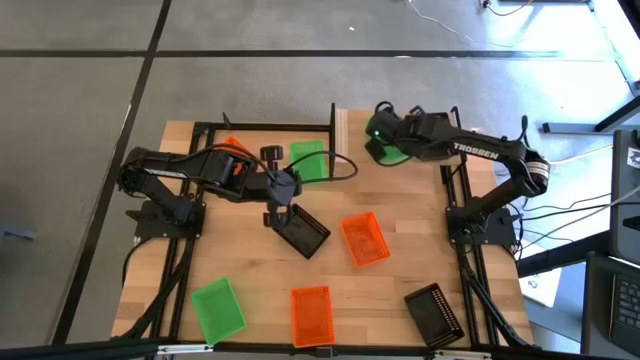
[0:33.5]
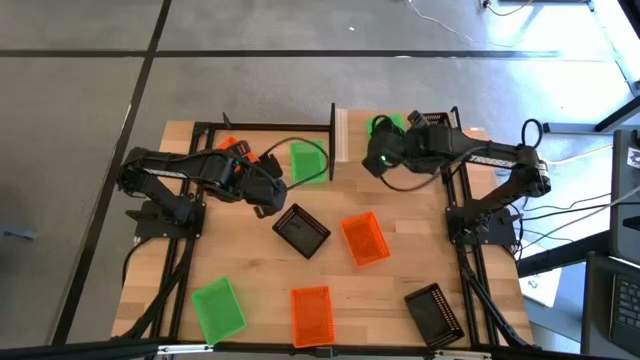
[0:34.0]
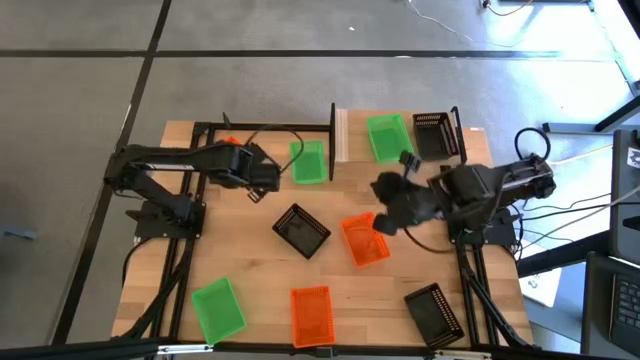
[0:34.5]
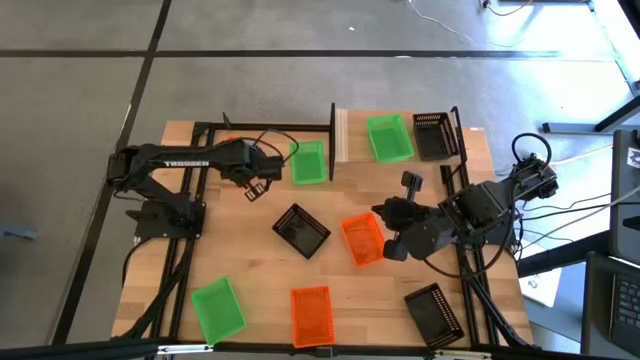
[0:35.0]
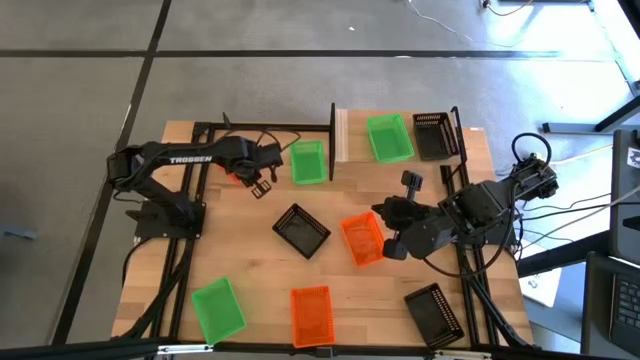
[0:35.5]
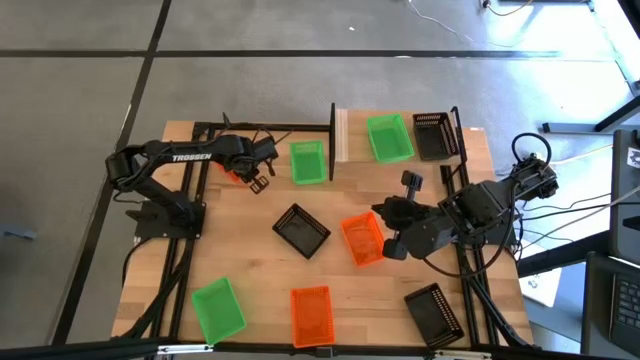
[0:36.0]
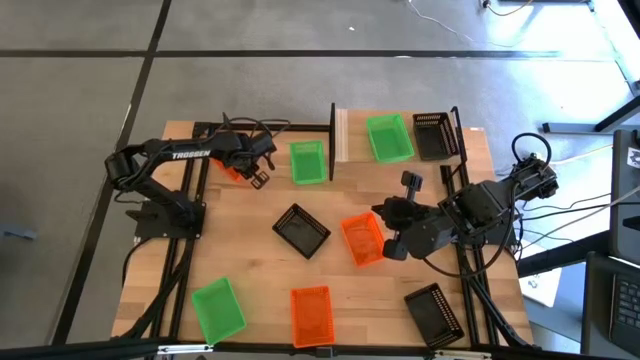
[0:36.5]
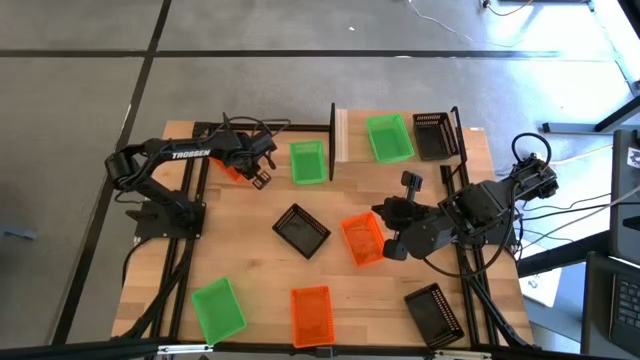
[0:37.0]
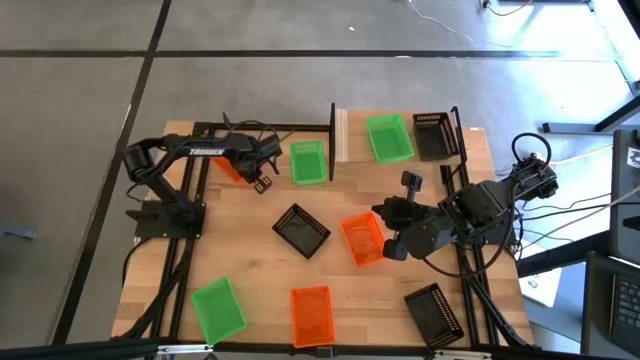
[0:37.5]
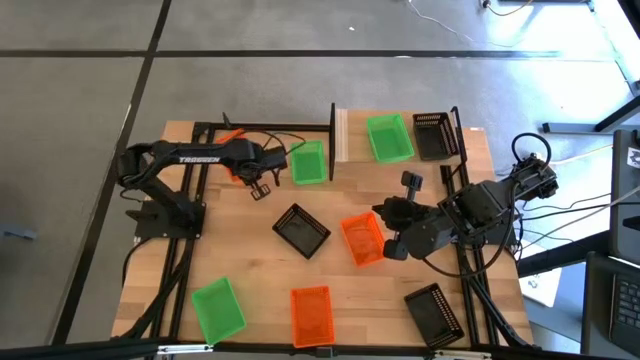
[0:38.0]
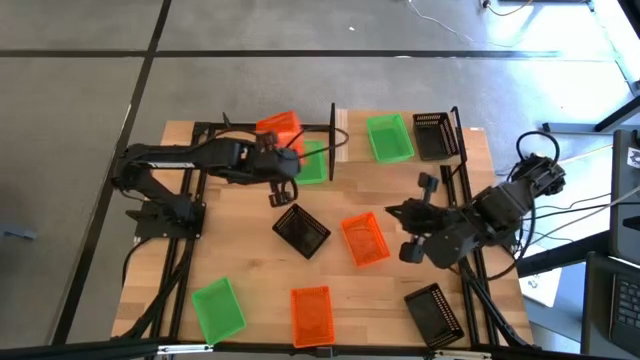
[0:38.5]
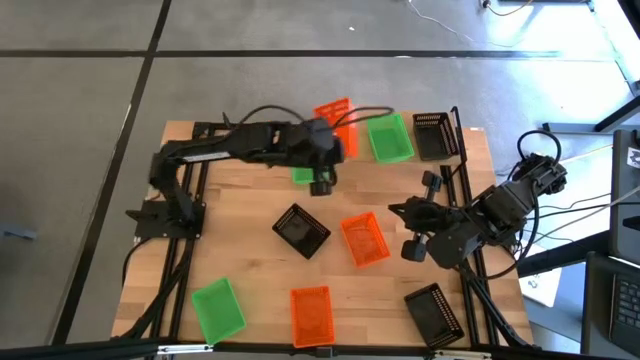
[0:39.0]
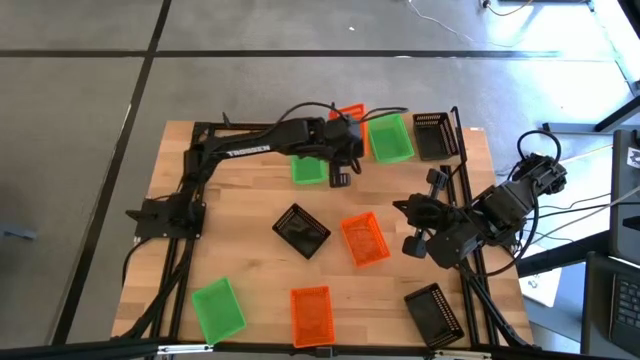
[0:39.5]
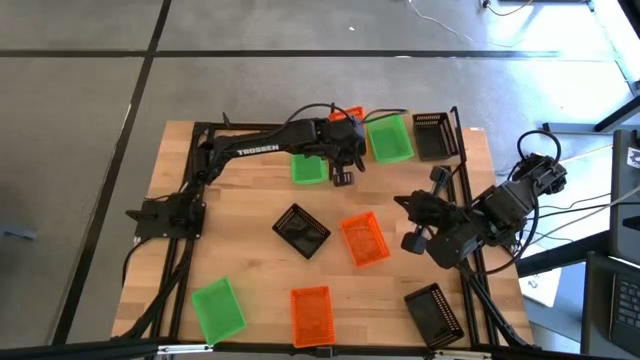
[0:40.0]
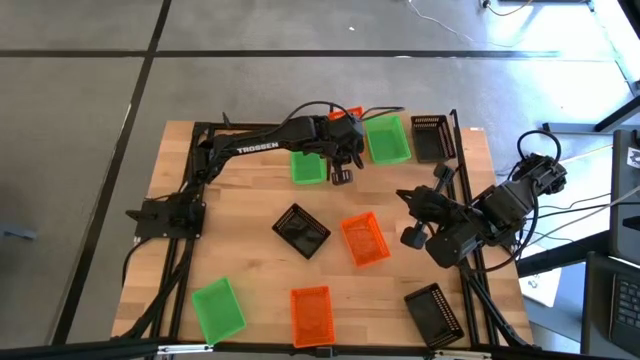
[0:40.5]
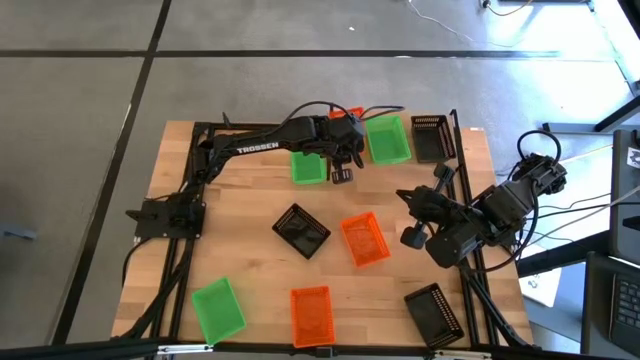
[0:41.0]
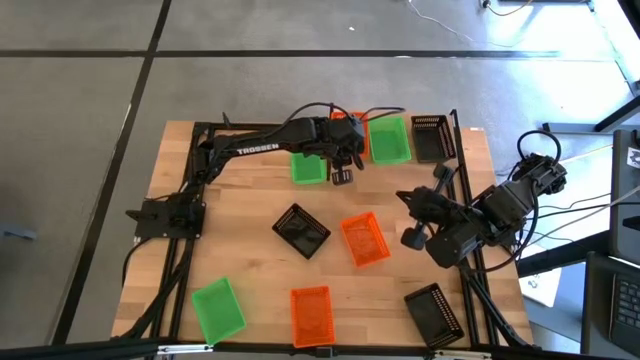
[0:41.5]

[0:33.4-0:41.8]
Task: Stack baskets on shelf by color
Put the top orange bin on the shelf

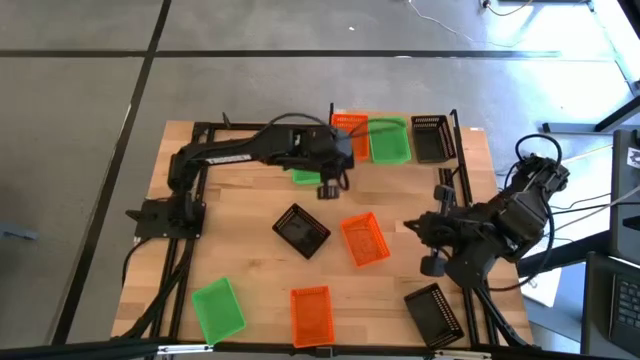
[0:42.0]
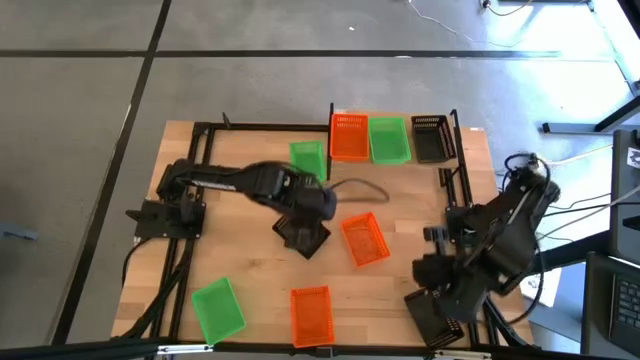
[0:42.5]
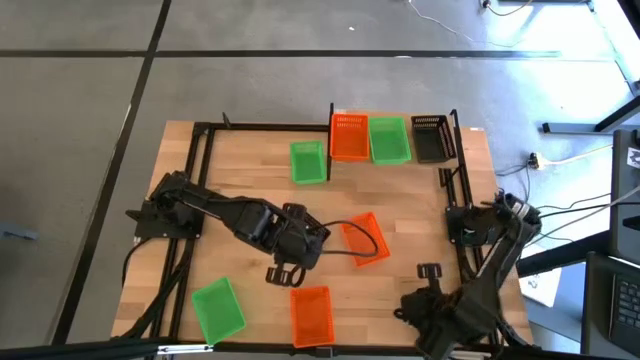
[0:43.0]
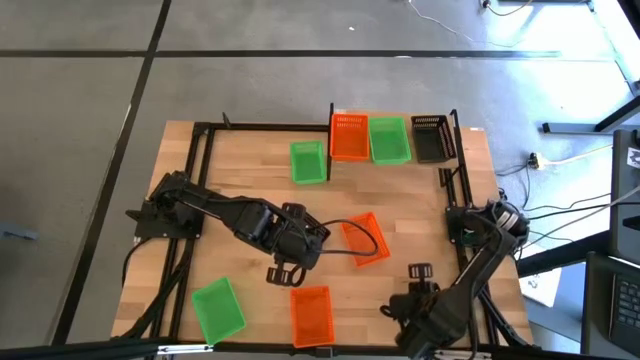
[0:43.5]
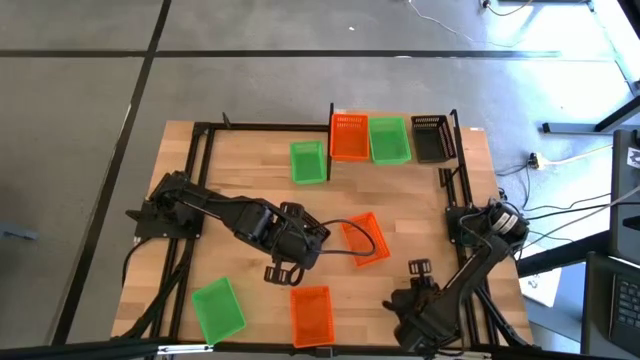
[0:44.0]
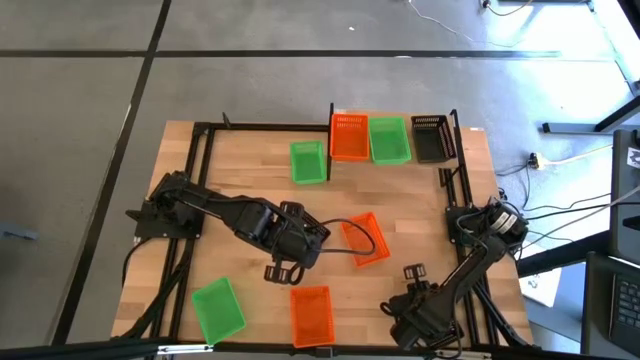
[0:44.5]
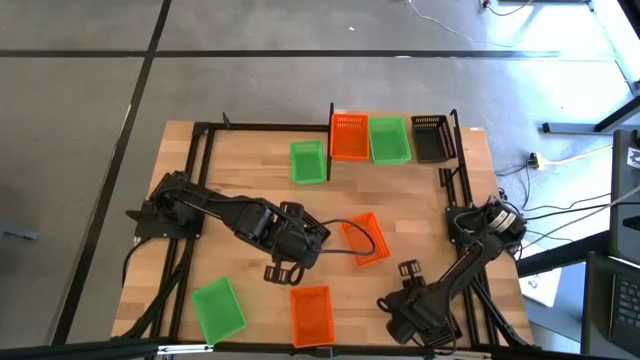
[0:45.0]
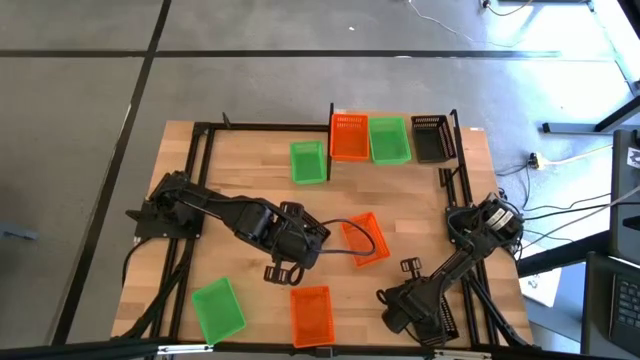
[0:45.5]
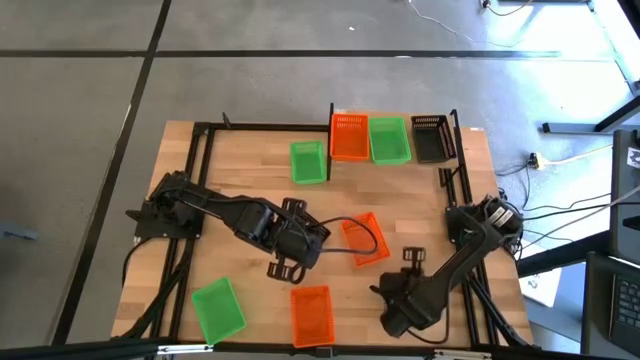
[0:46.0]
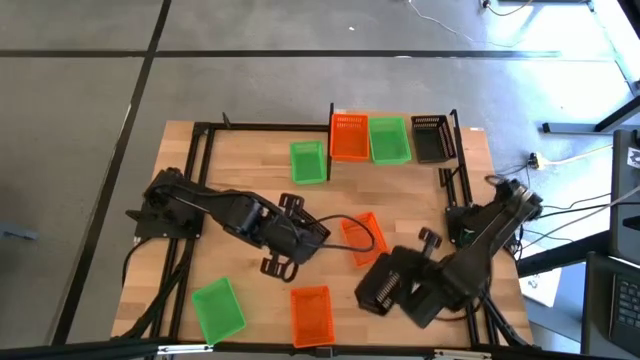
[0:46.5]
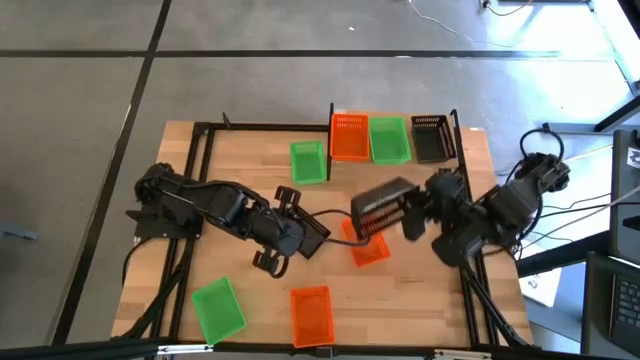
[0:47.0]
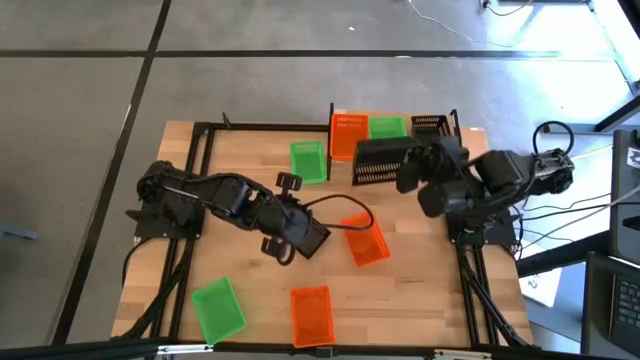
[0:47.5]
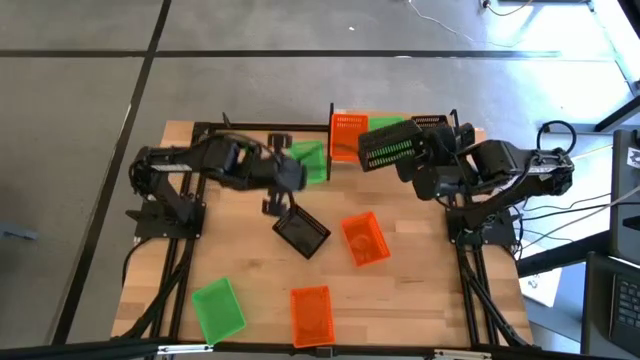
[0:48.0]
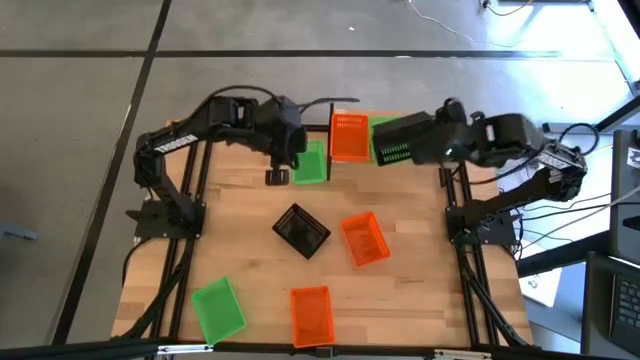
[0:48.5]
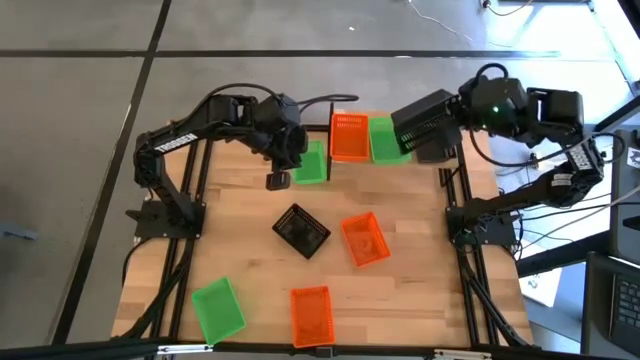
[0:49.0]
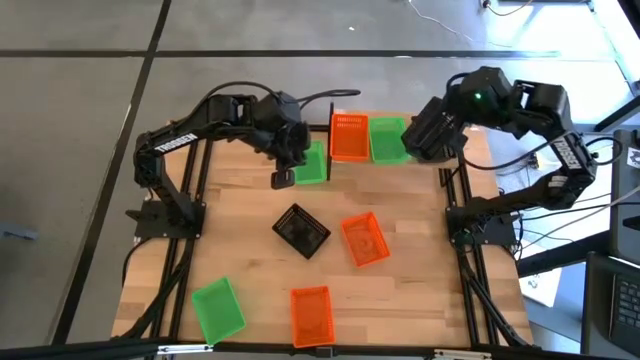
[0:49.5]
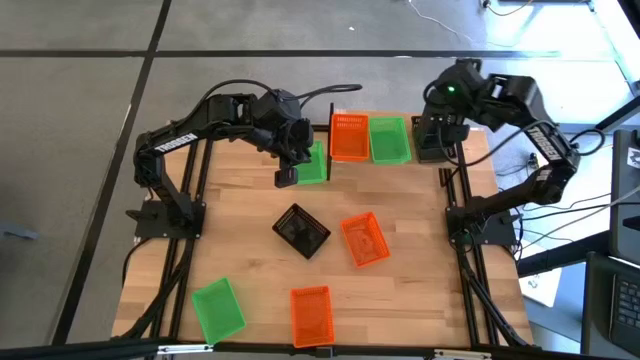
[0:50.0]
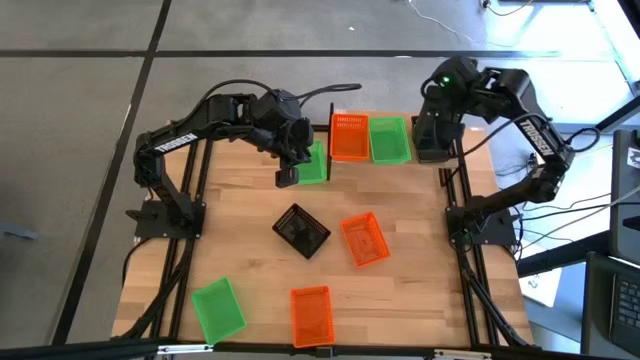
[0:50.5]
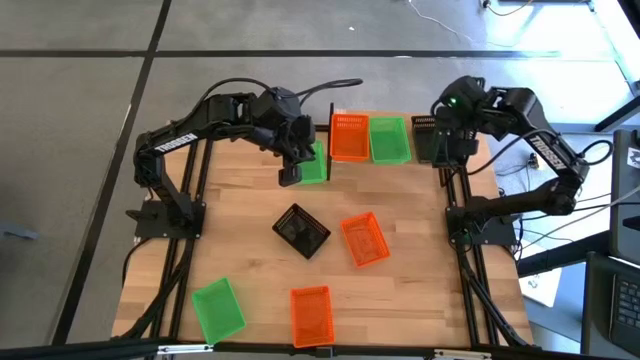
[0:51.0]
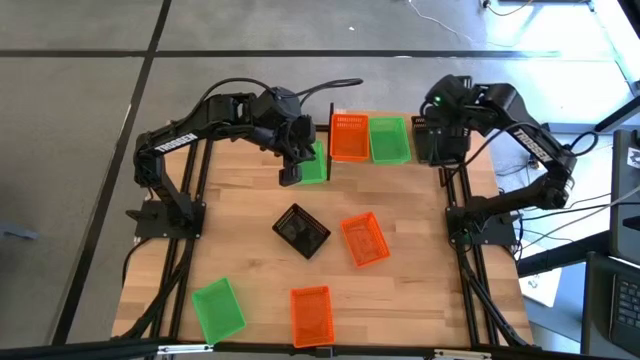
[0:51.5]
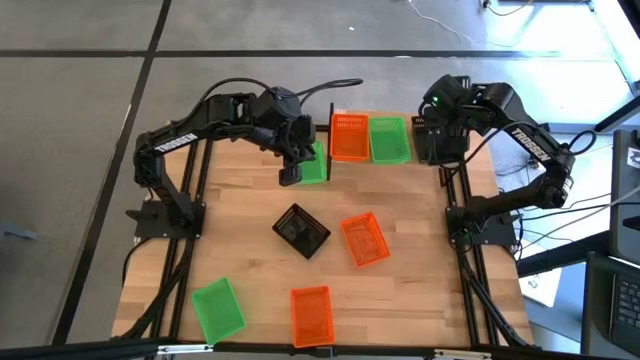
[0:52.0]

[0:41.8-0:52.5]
Stack the bottom black bin on top of the black bin on the shelf

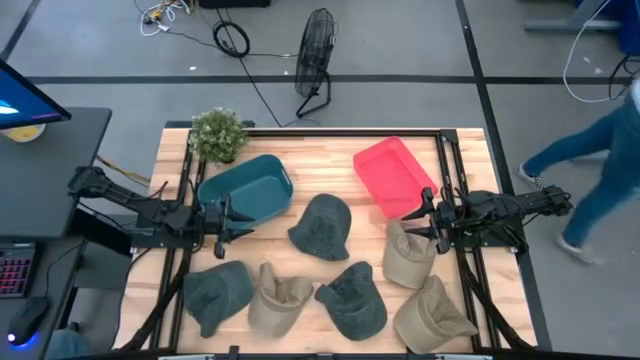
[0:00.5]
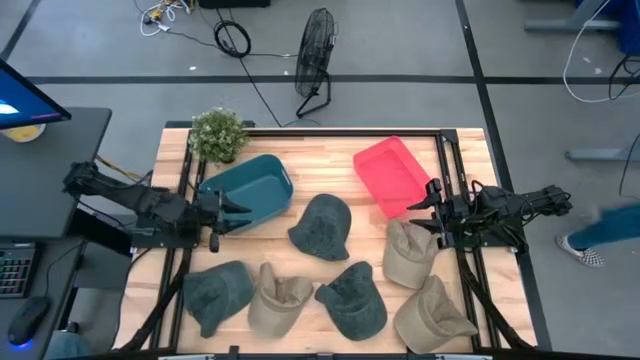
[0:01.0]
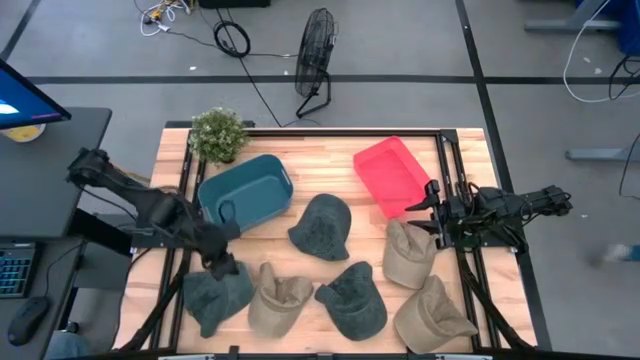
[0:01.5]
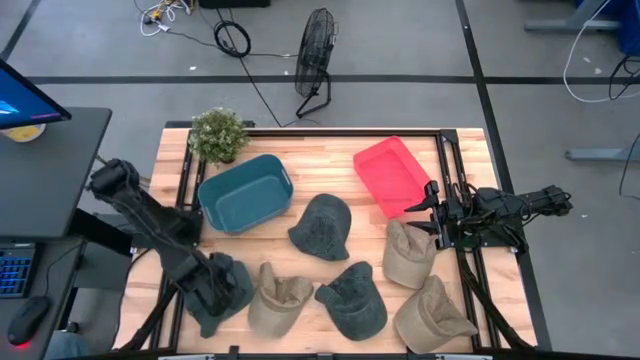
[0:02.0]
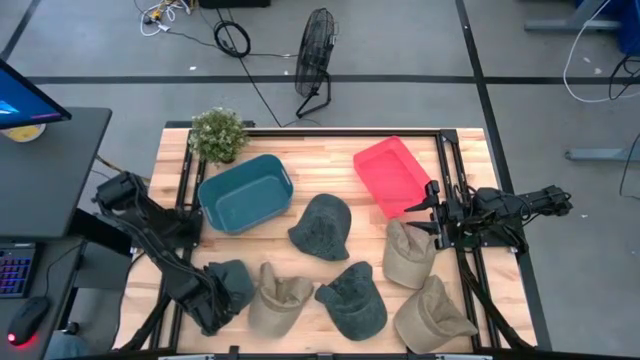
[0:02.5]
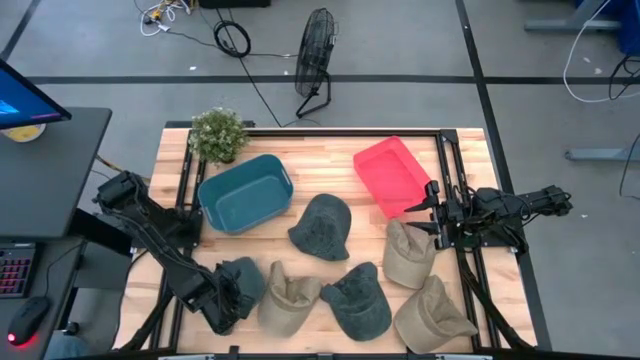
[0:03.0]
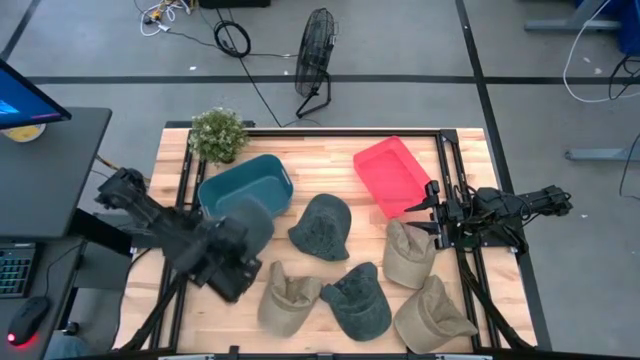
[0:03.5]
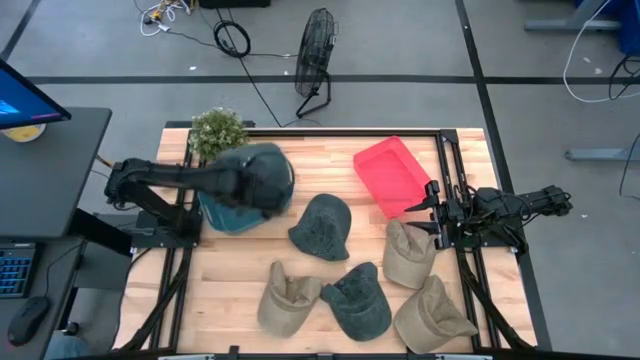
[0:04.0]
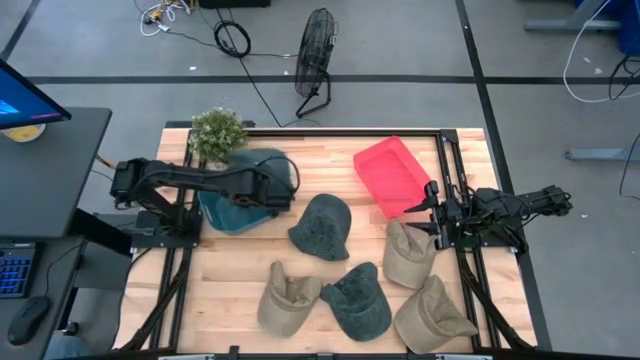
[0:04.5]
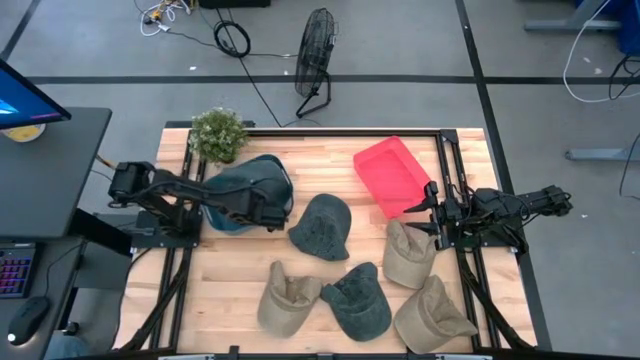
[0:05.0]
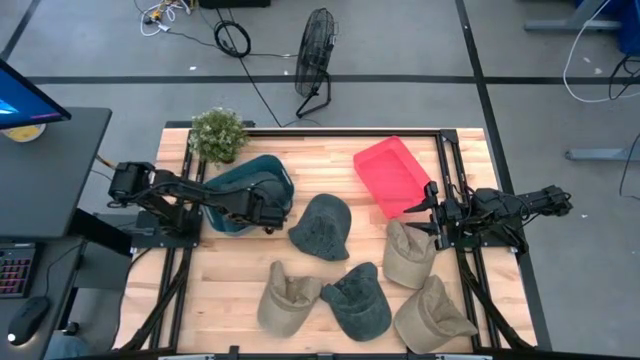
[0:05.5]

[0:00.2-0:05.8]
Task: Pick & Place hat
Put the bottom left black cap into the blue bin
